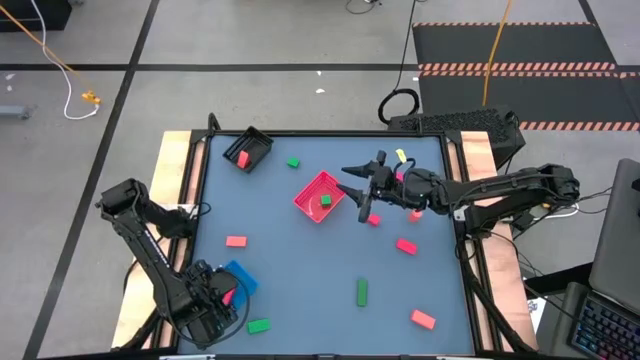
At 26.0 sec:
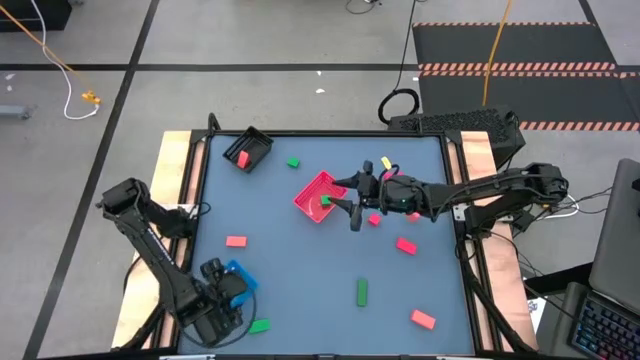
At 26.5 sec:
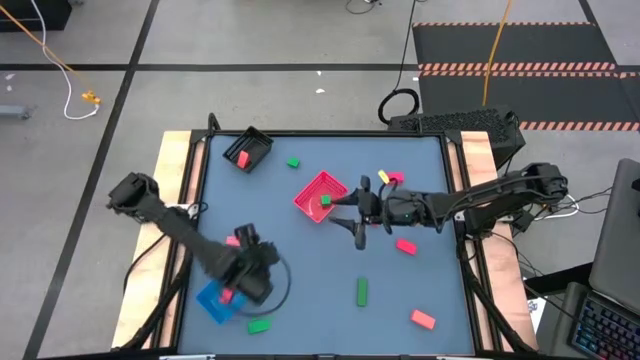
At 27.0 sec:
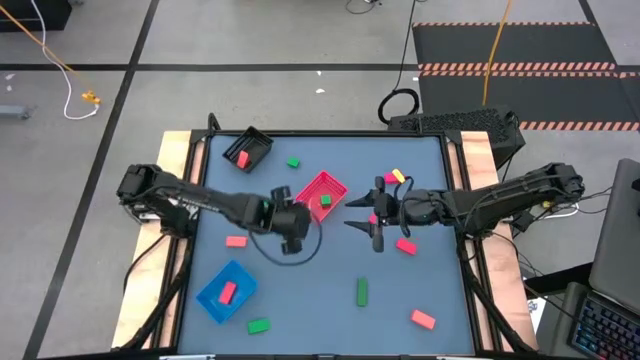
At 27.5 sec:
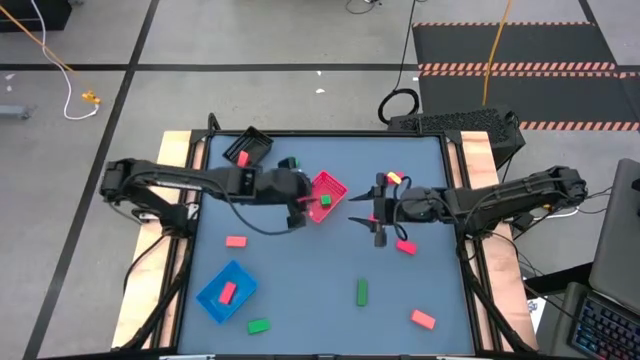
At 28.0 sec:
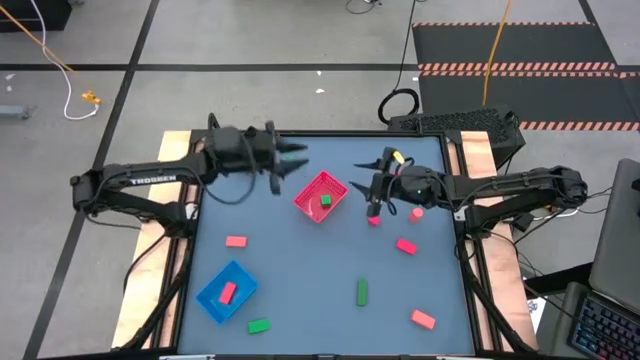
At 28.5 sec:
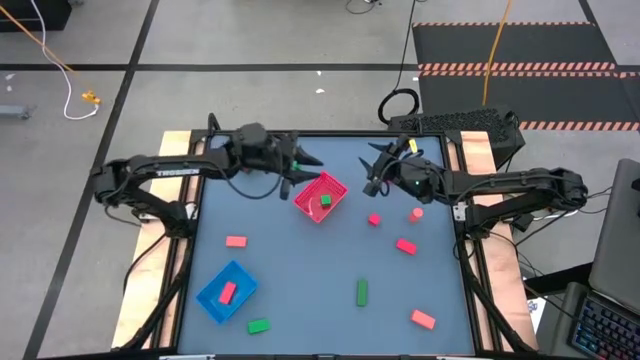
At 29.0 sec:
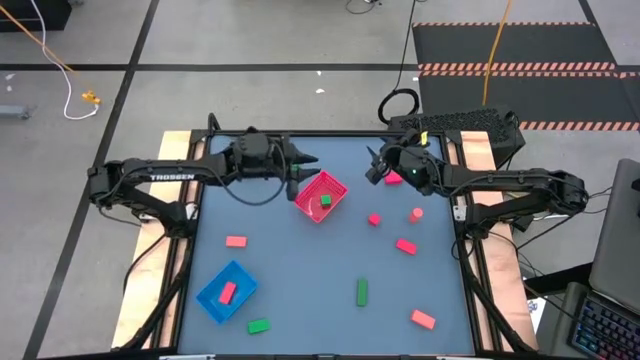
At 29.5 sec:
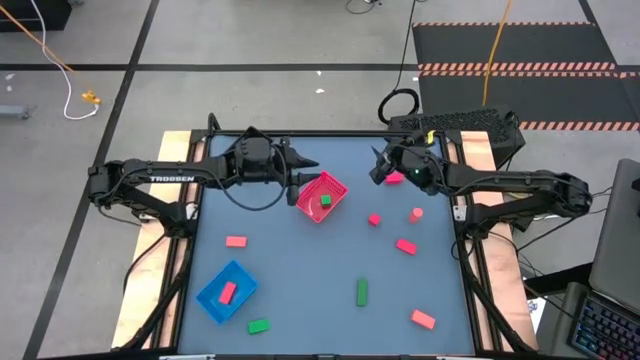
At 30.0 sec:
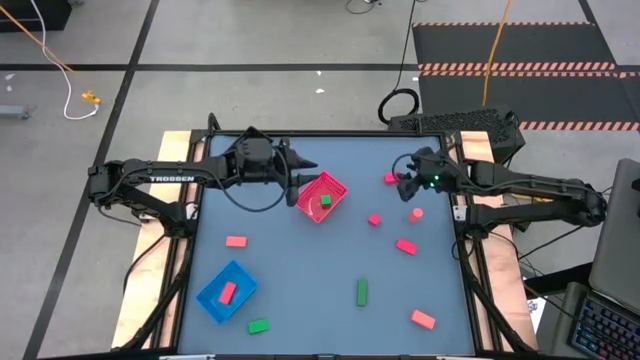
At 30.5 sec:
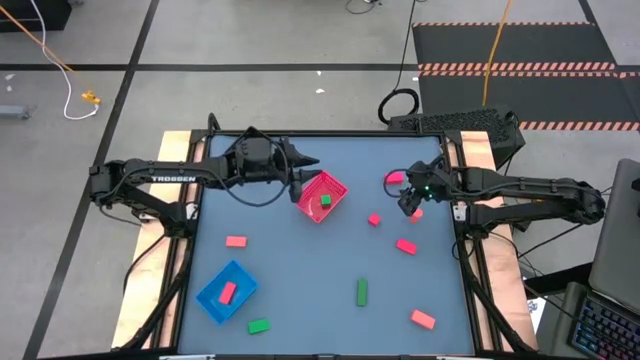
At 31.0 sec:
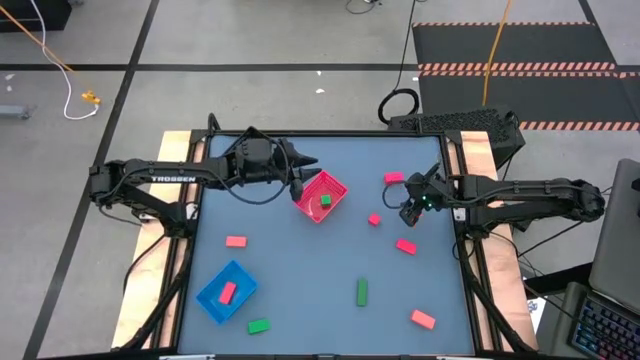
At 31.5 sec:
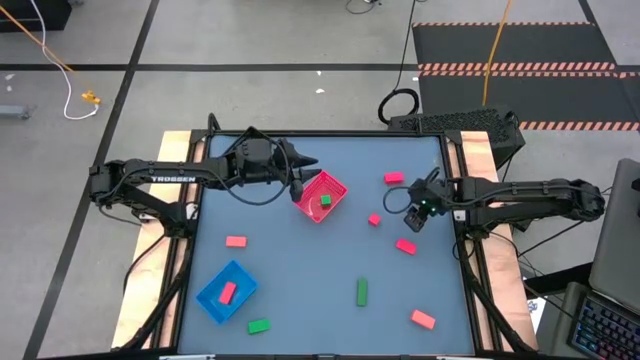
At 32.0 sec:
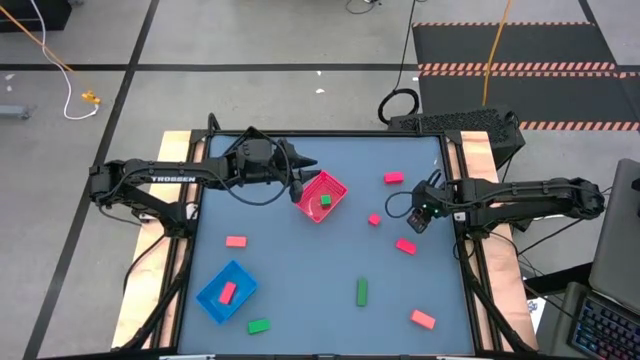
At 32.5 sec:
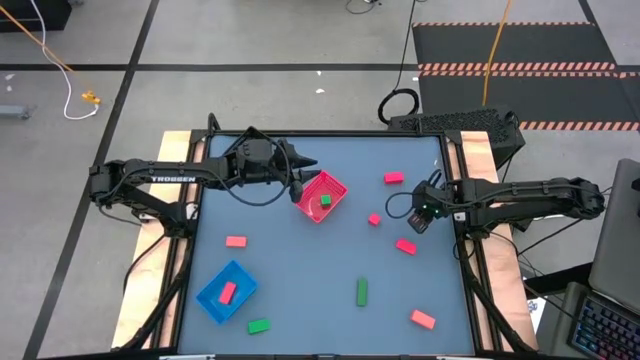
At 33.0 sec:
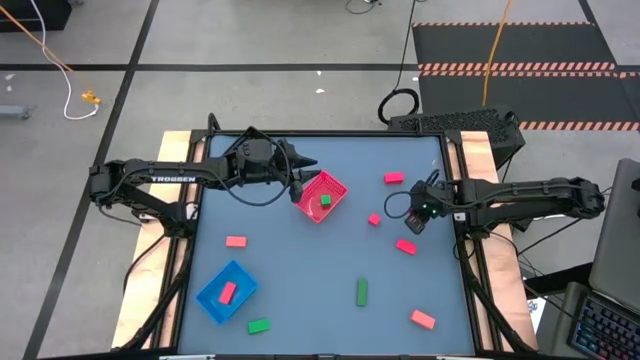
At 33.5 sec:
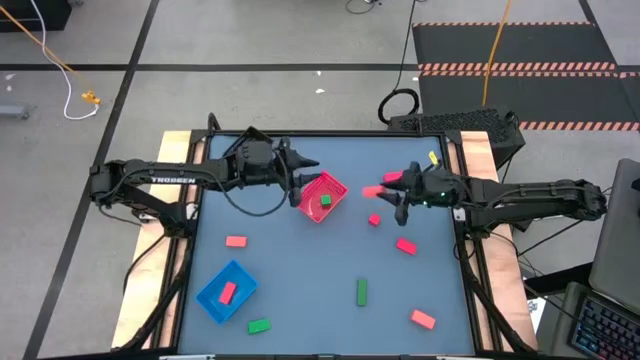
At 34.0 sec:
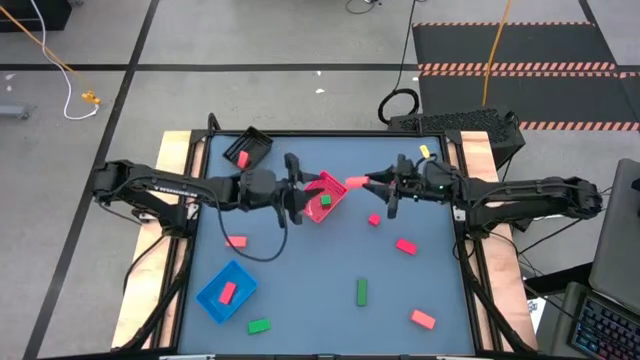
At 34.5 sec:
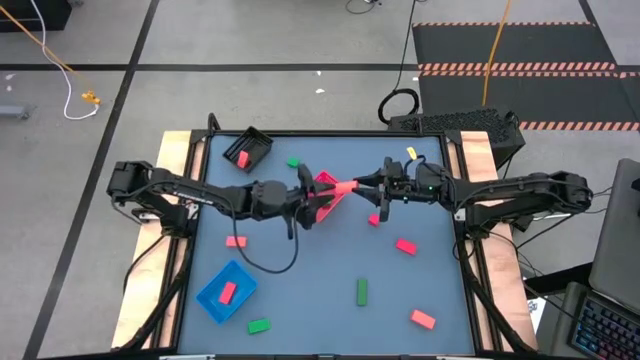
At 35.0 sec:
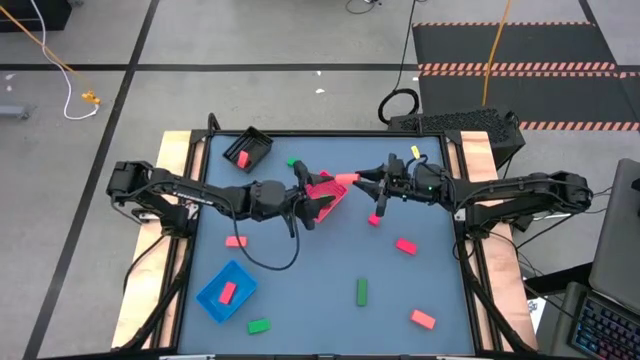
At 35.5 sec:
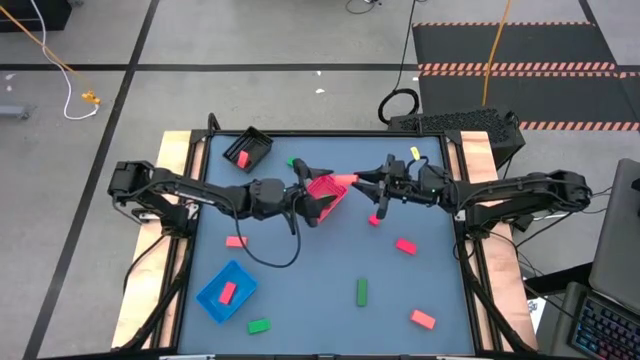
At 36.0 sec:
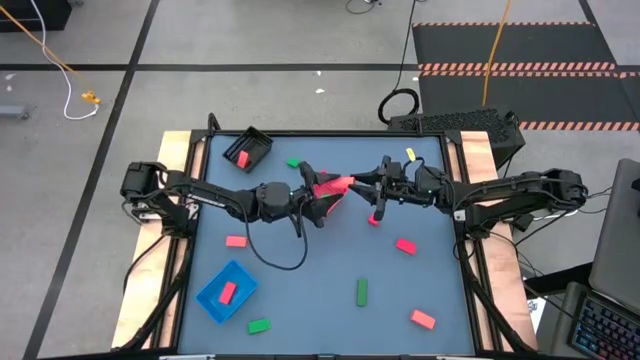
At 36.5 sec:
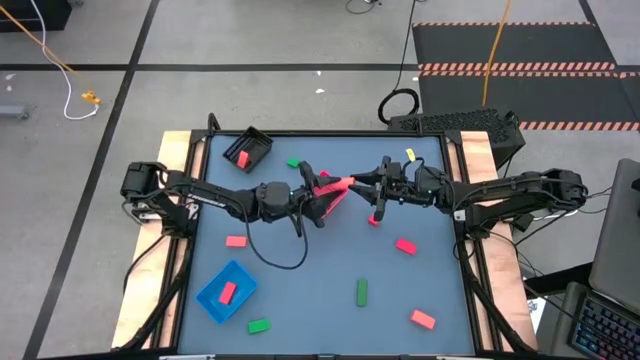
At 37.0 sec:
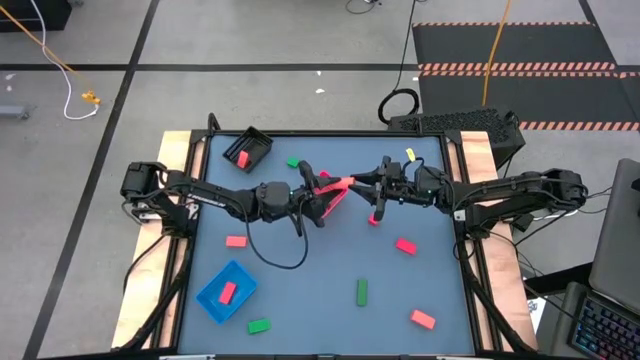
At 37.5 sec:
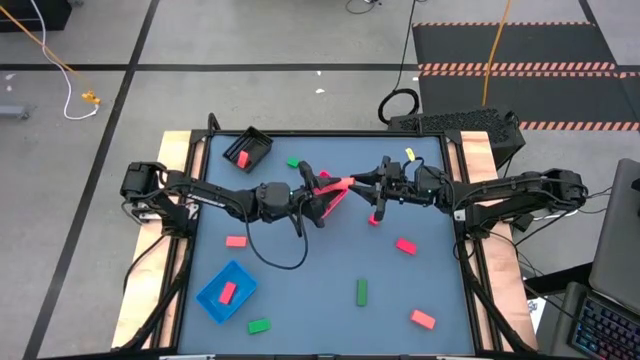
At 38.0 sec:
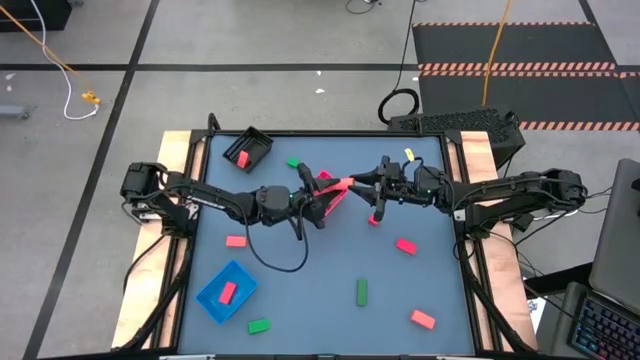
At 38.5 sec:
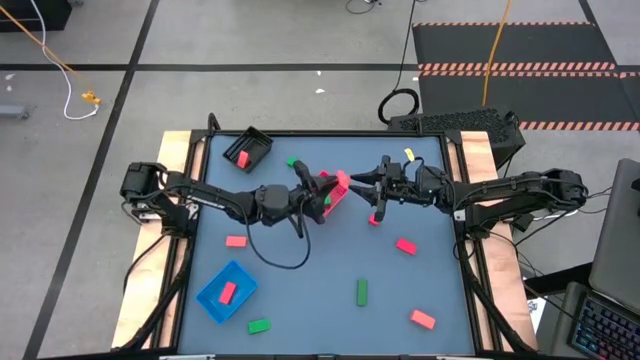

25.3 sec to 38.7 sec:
Task: Sort & place blocks by color
Put the orange block into the black bin

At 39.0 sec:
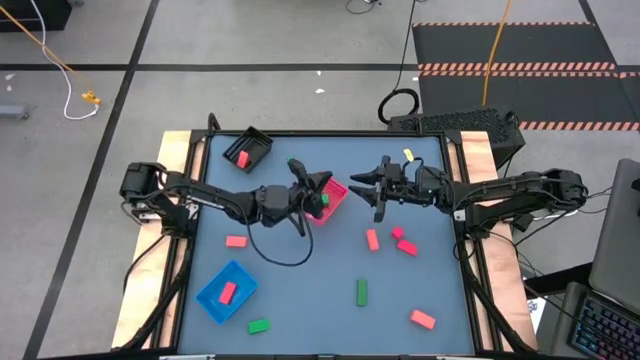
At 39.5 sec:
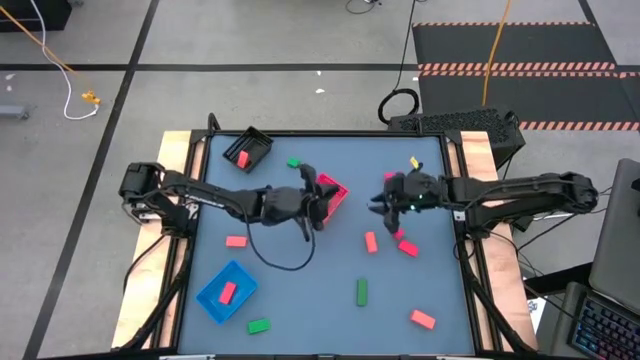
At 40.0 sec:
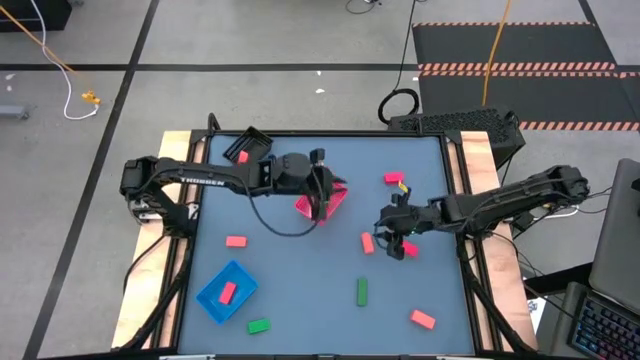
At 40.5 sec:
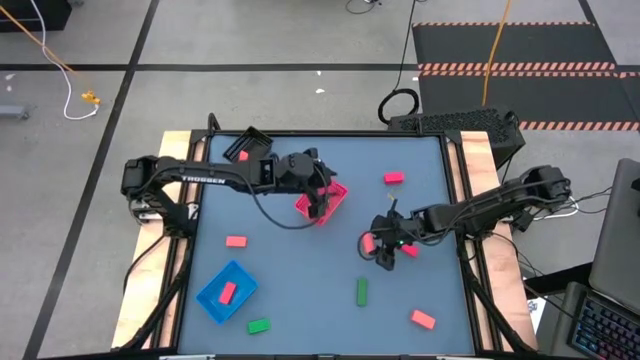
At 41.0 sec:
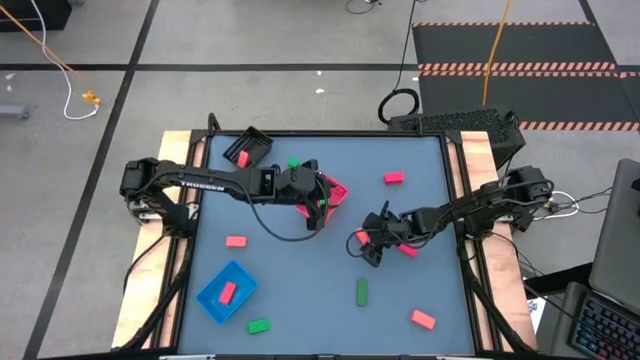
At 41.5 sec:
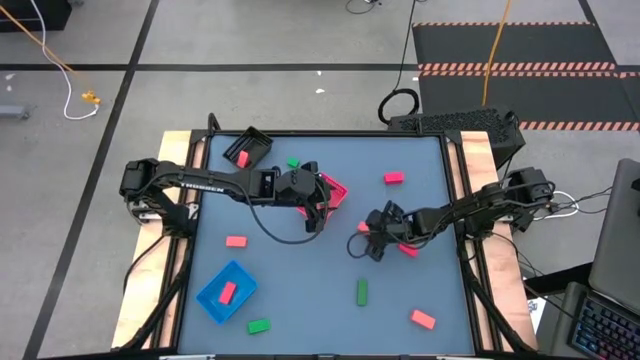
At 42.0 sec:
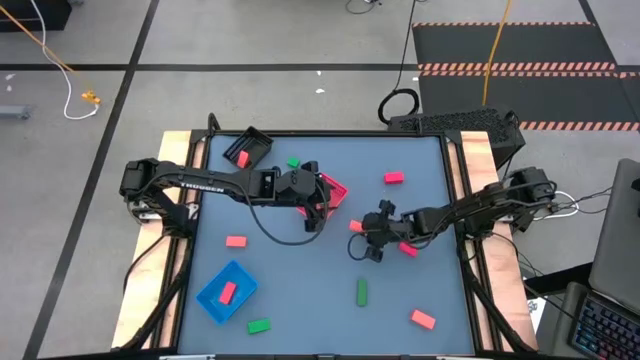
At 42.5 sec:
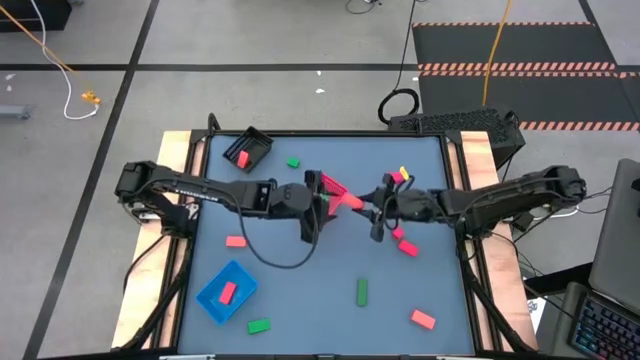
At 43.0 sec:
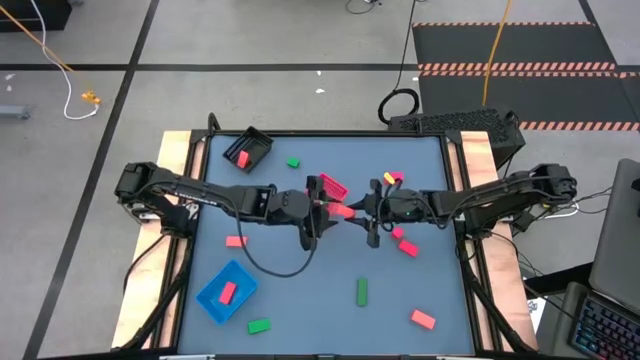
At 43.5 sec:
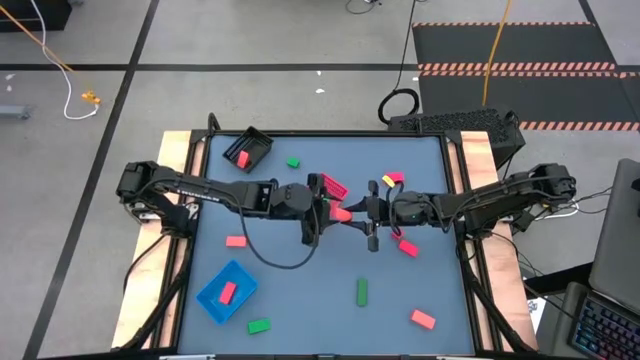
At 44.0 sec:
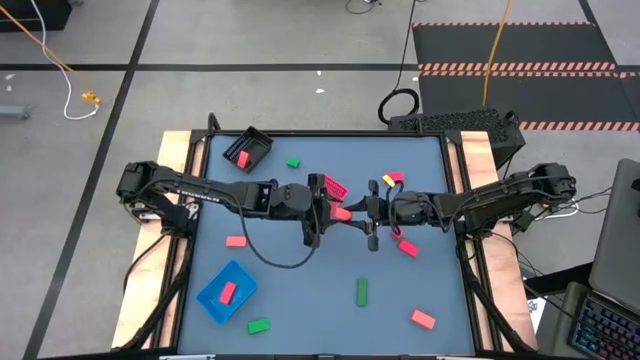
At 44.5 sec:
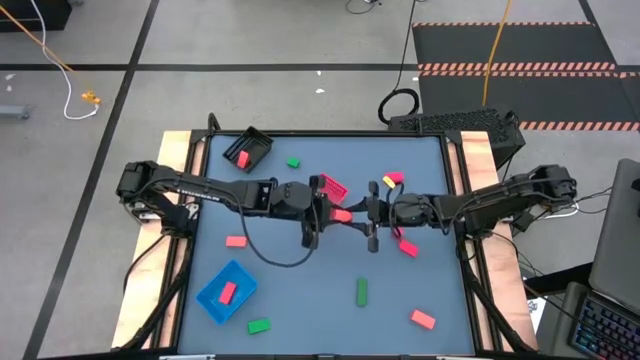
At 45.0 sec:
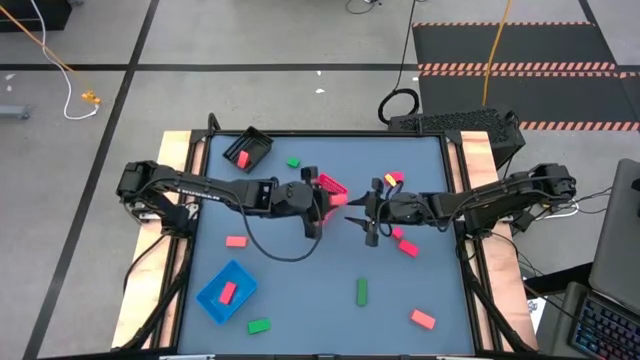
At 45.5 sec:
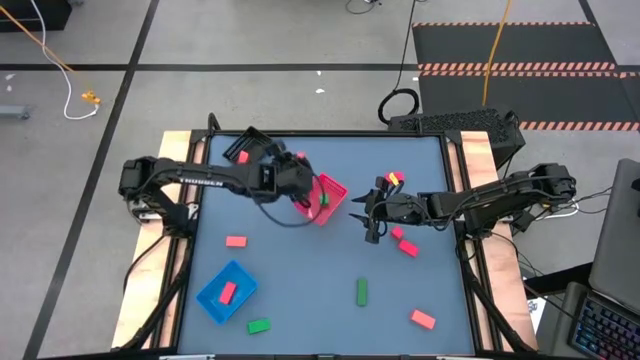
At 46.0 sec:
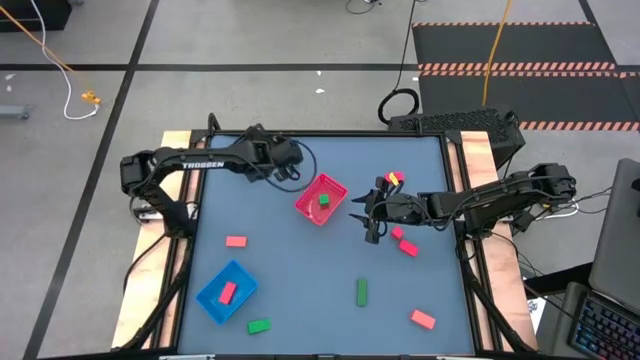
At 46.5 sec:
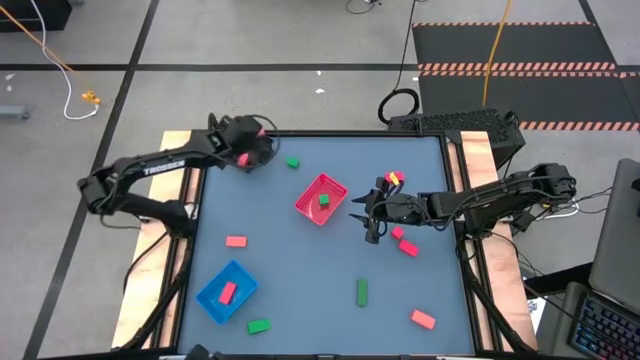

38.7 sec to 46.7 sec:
Put the orange block into the black bin

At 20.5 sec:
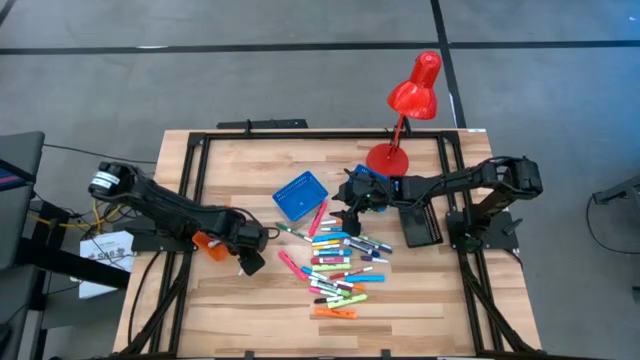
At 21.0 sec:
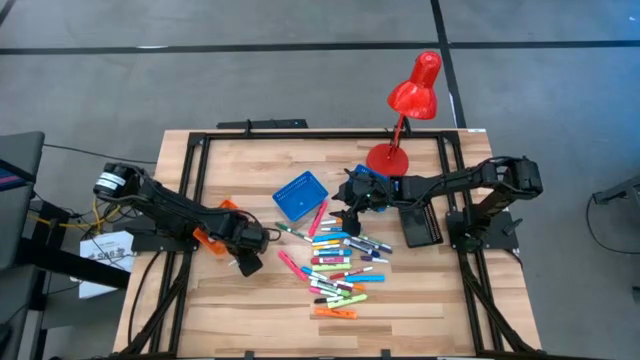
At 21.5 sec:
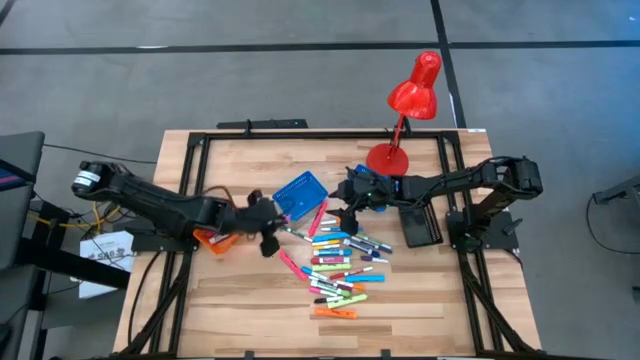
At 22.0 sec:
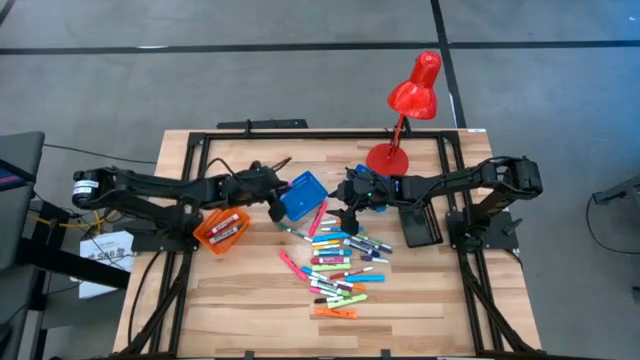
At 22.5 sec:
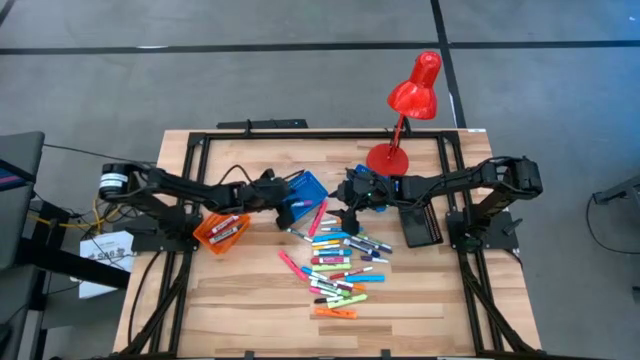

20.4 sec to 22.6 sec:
Task: Pick & Place Markers
Put the left small pink highlighter pen into the left blue bin
